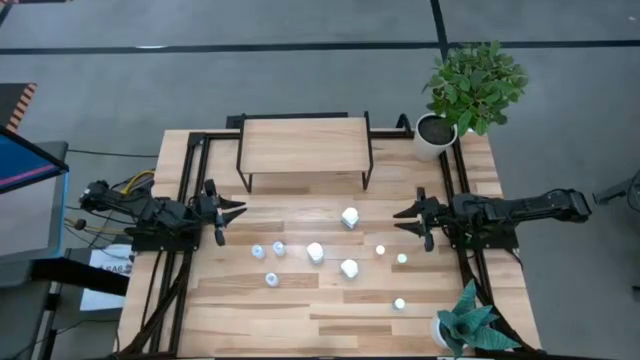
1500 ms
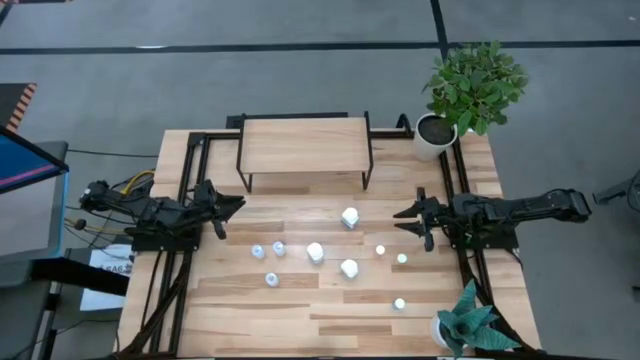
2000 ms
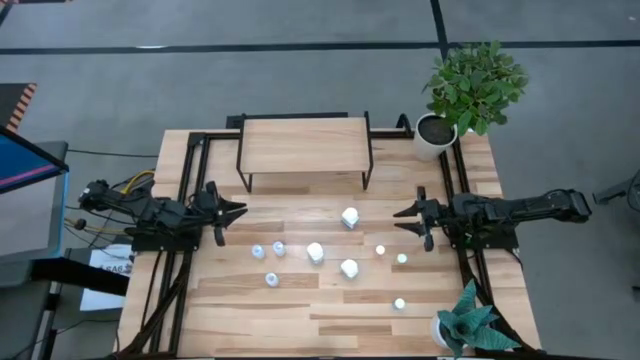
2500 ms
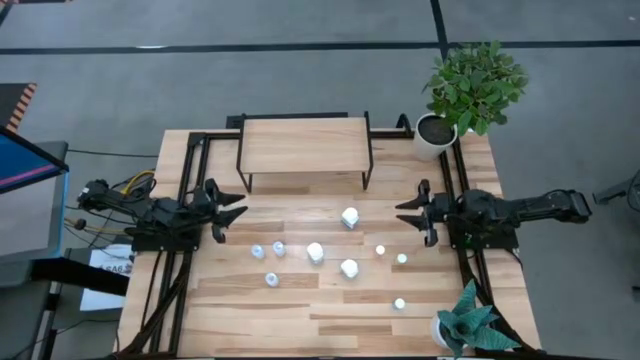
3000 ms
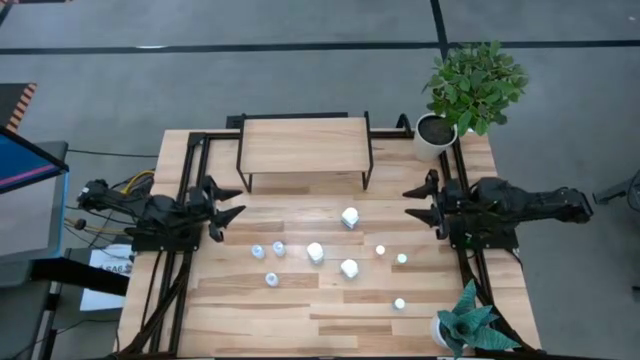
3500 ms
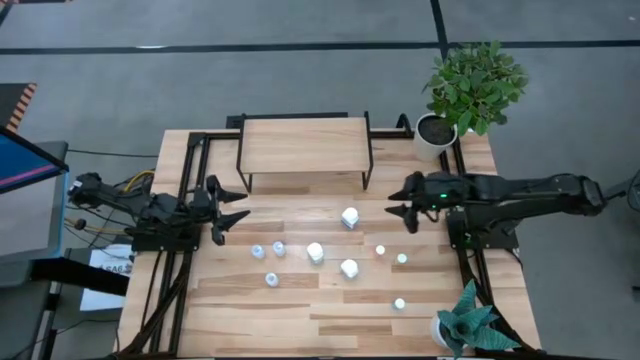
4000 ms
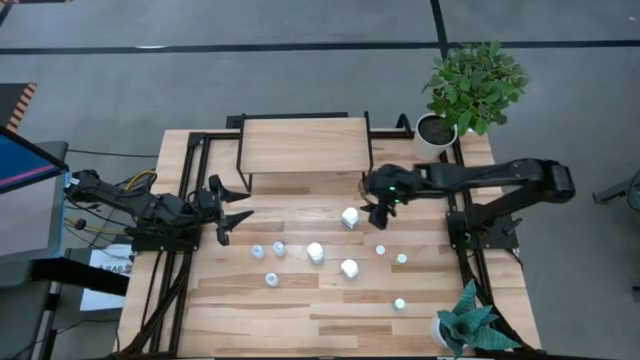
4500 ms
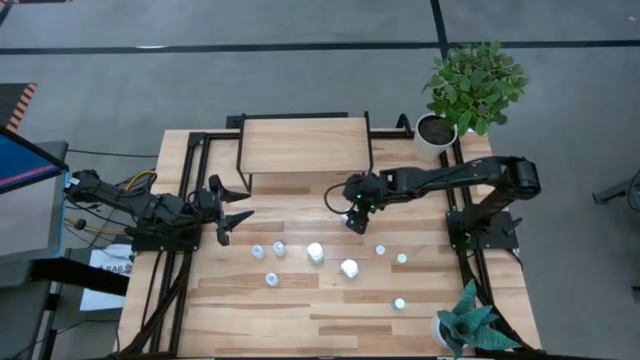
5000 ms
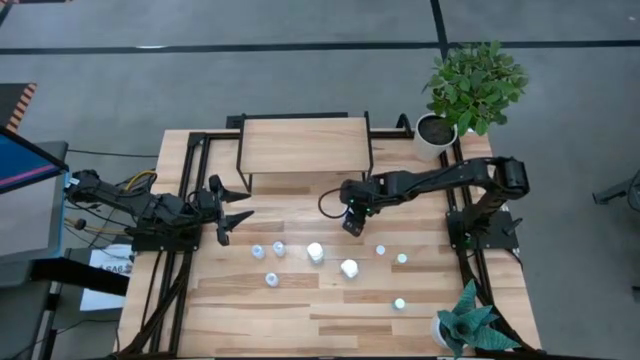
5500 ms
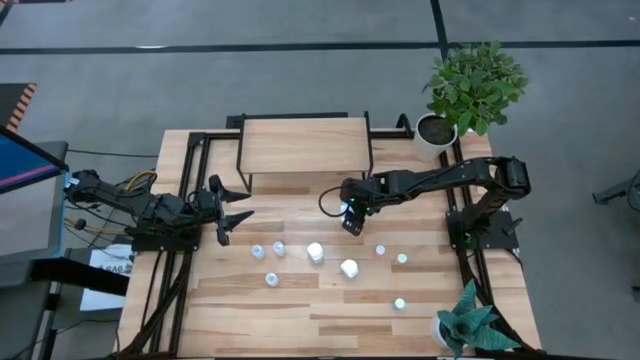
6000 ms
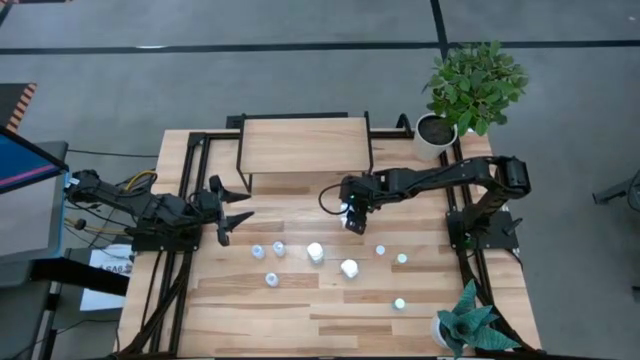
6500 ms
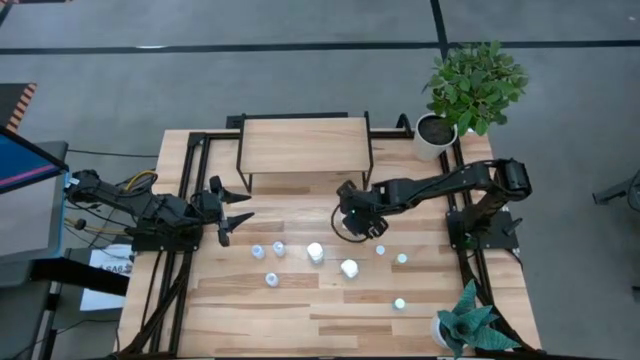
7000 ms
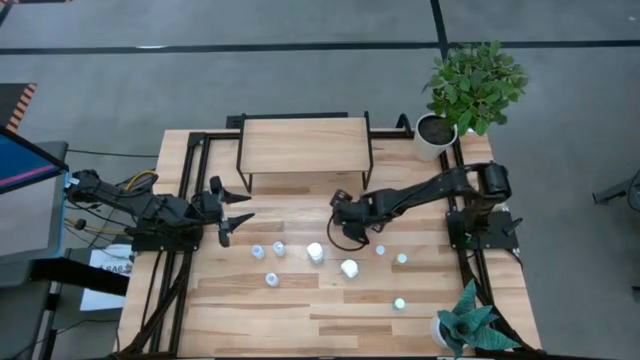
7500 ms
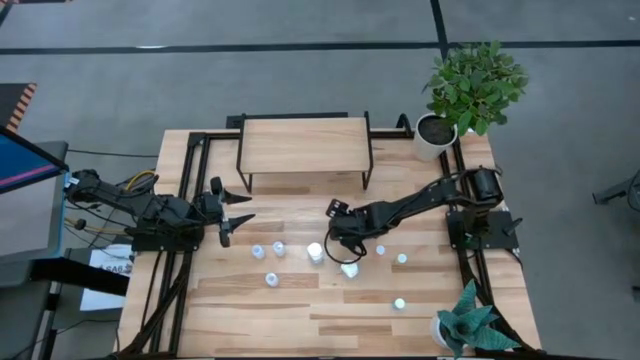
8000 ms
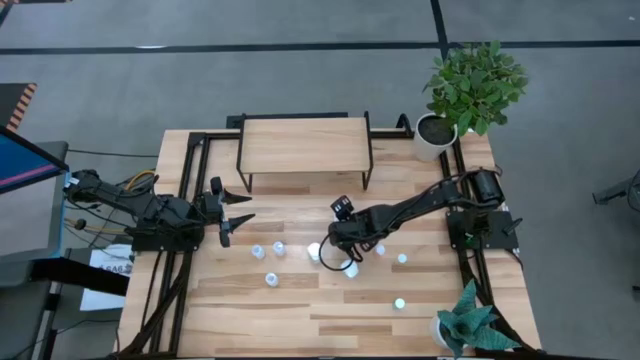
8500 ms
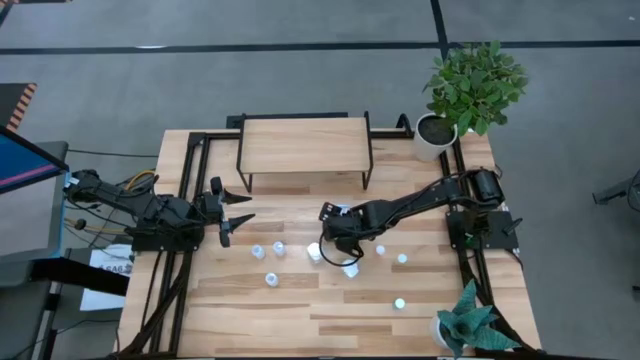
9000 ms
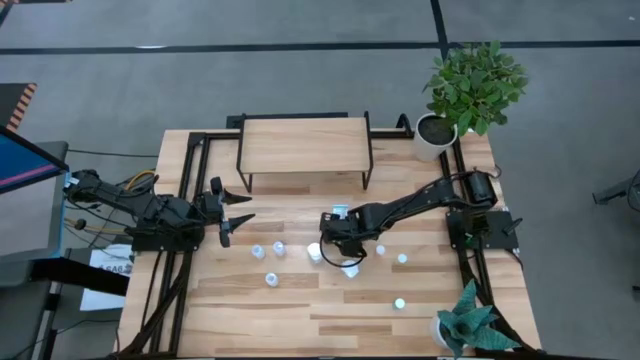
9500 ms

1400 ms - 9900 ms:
Task: Pick and place medicine bottles onto shelf by color
Put the top white pill bottle on the shelf

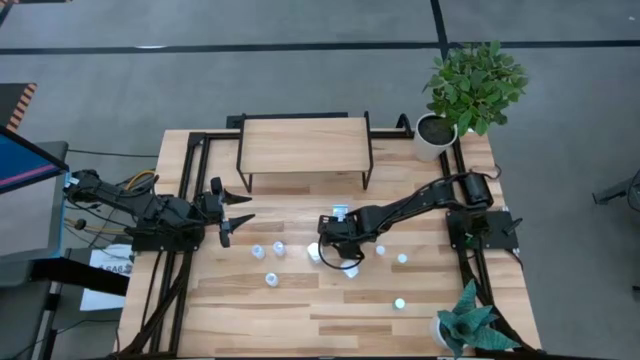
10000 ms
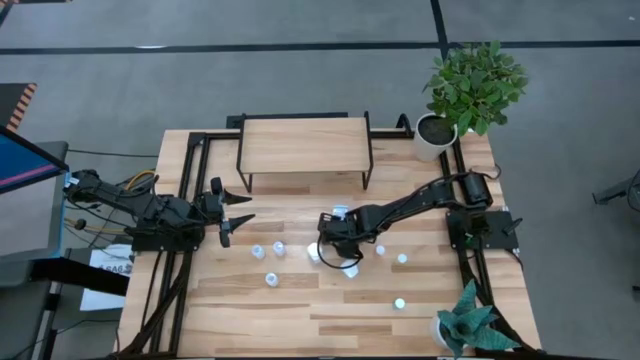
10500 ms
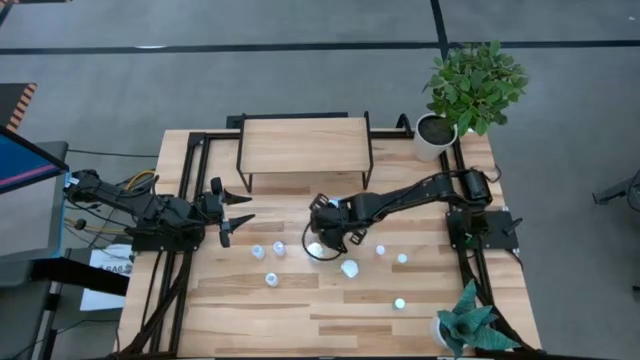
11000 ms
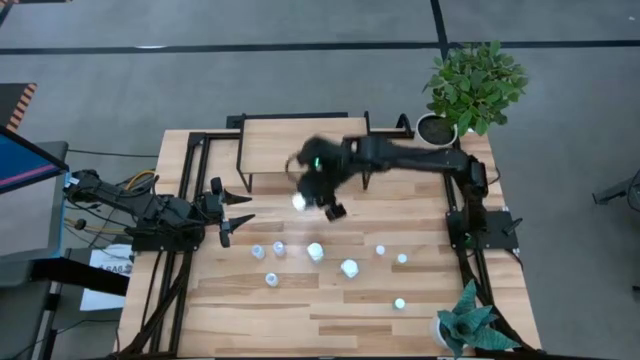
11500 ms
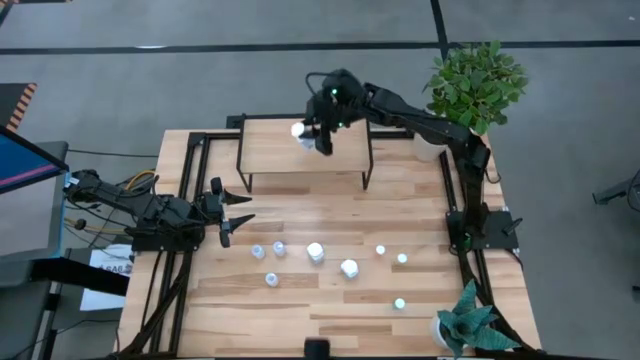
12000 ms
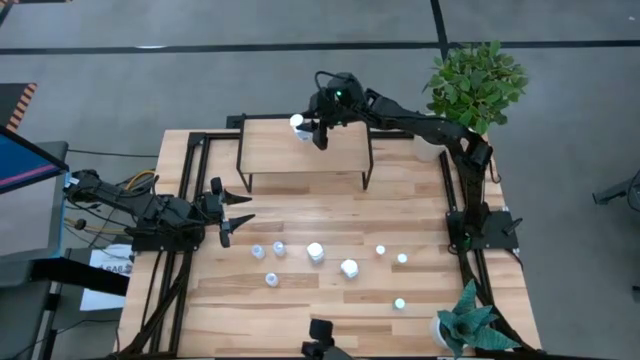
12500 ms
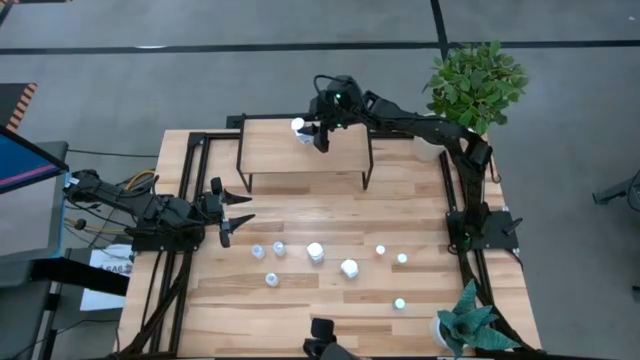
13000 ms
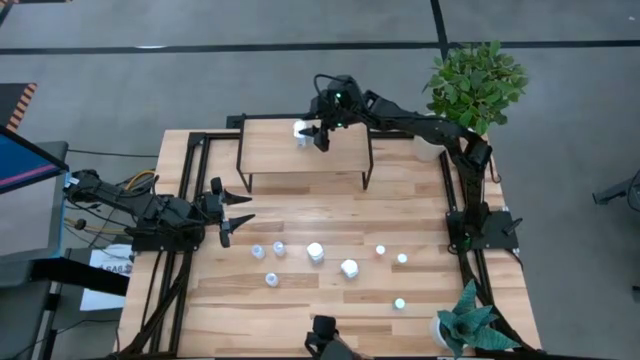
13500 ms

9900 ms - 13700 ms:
Put the top white pill bottle on the shelf

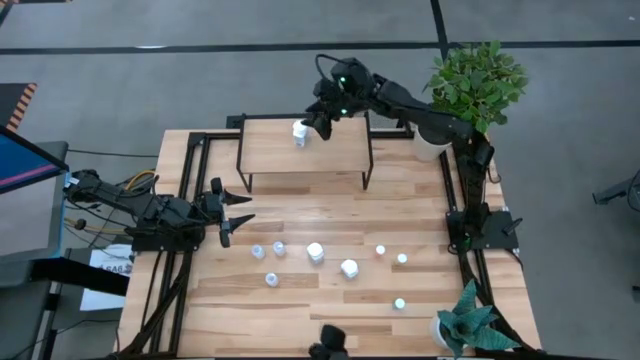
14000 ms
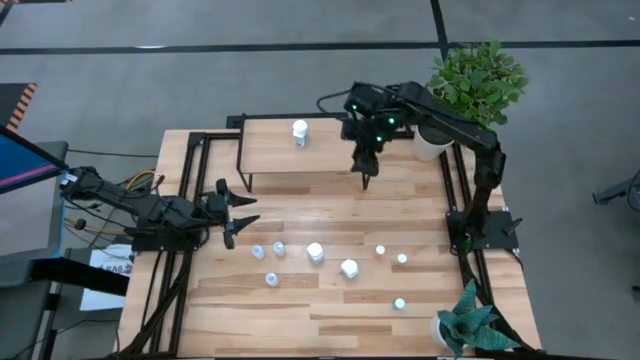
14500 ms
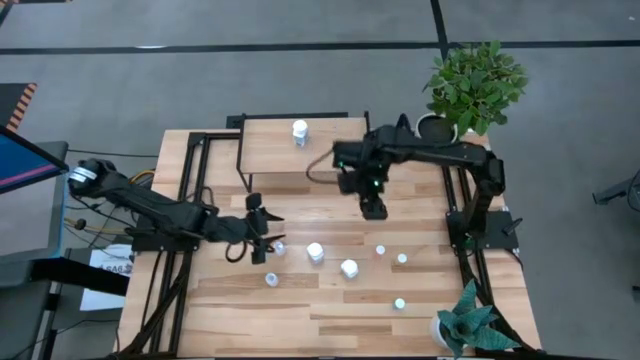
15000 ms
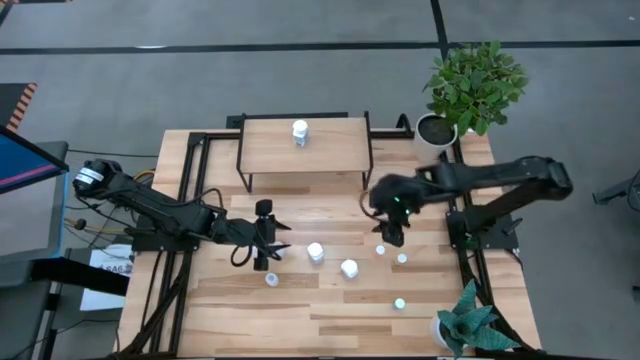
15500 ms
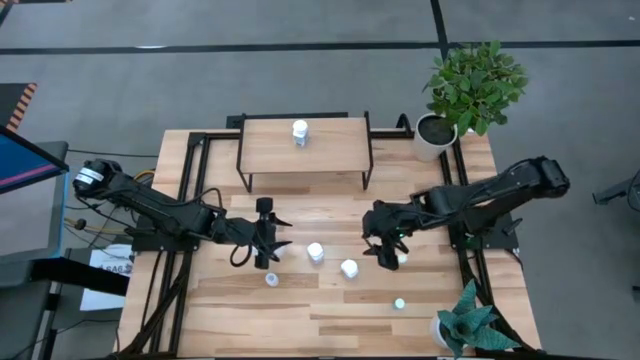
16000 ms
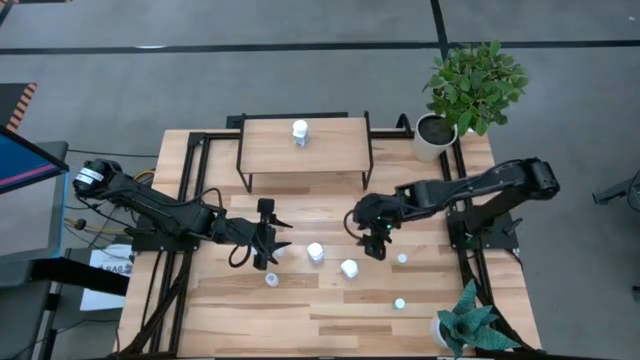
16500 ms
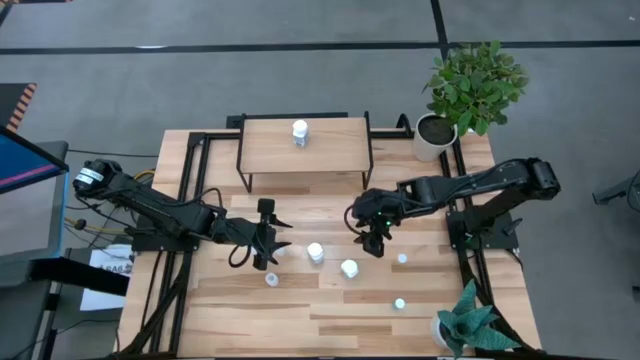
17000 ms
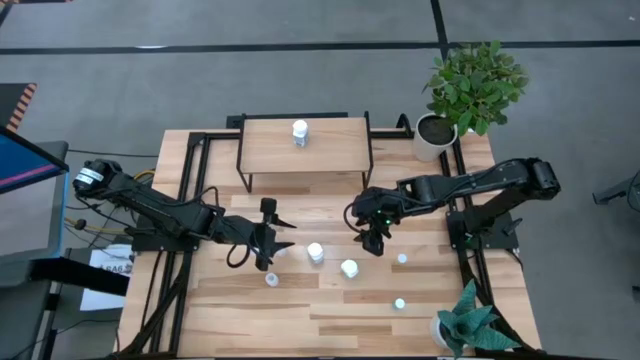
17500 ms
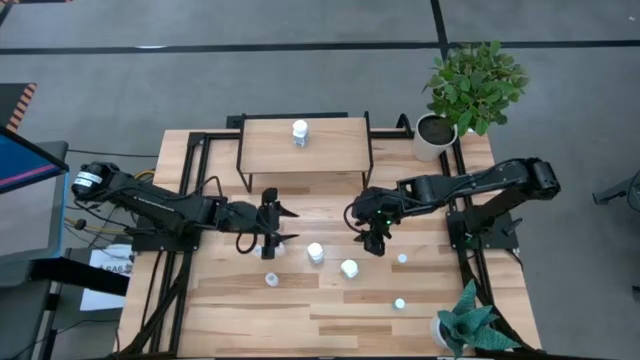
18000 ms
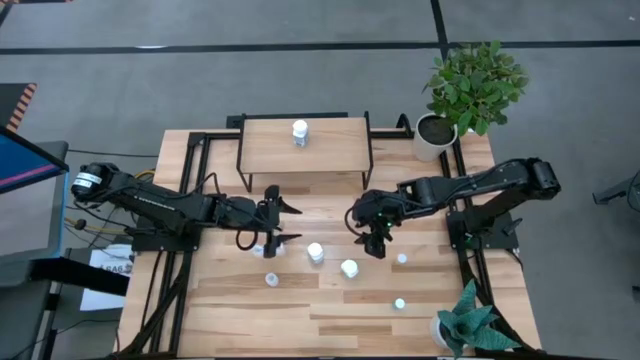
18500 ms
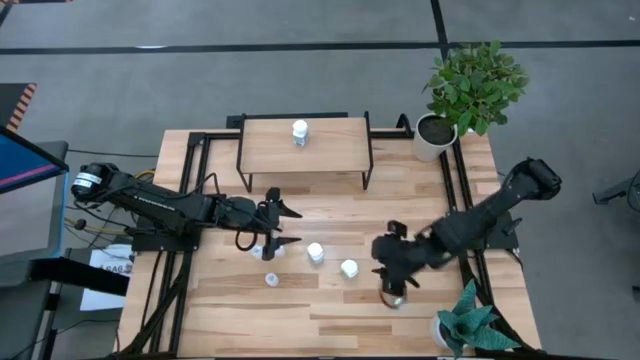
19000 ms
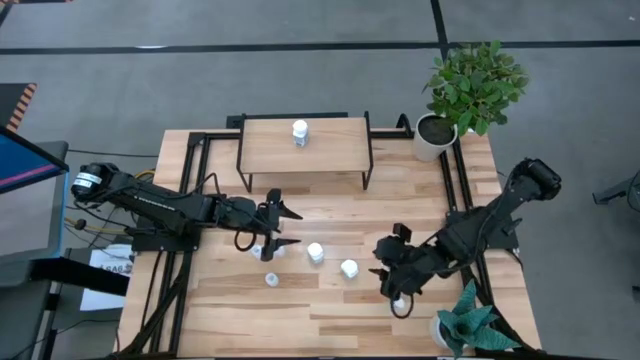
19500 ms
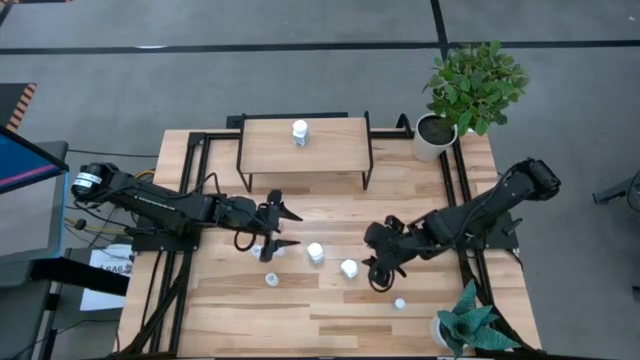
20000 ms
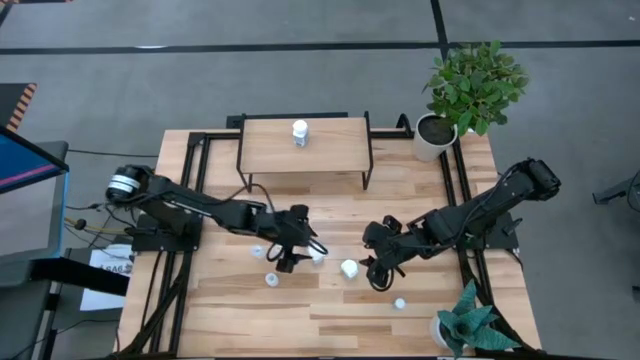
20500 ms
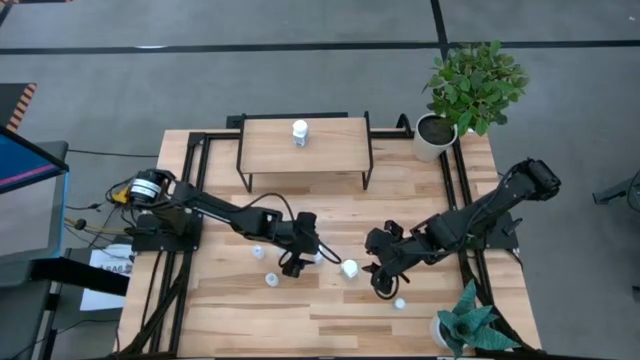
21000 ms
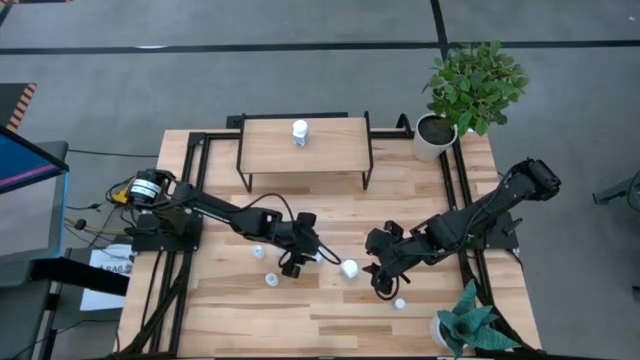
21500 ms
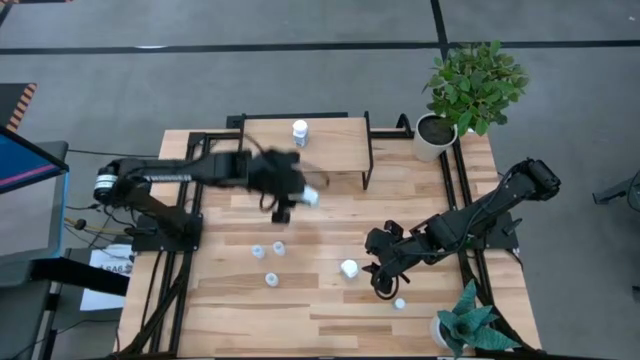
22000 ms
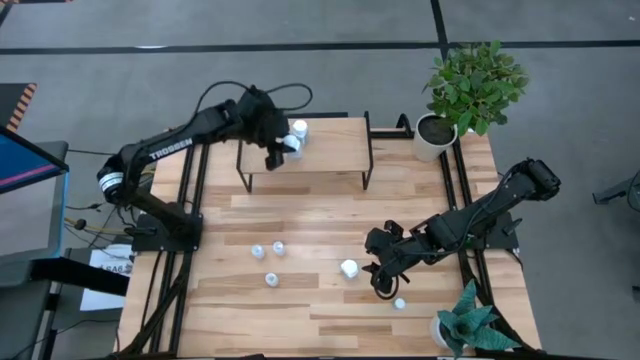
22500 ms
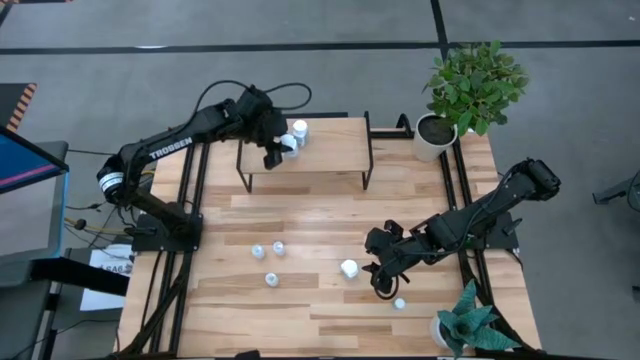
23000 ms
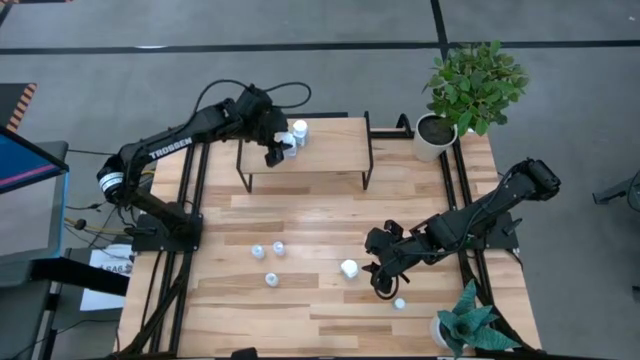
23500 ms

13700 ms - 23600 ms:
Put the left white pill bottle on the shelf
